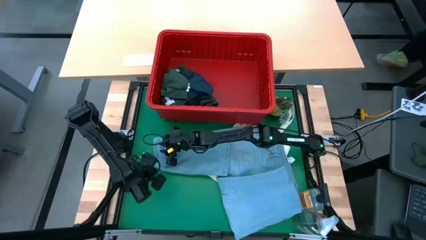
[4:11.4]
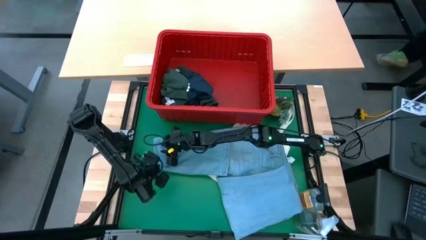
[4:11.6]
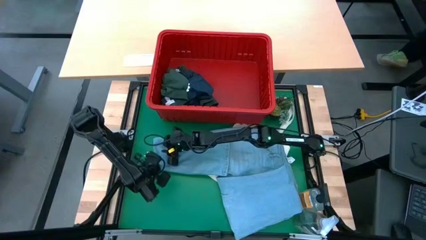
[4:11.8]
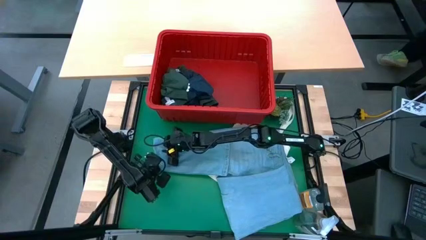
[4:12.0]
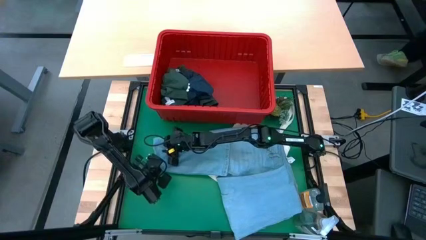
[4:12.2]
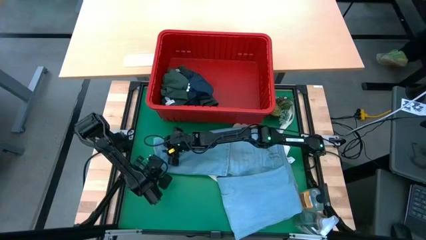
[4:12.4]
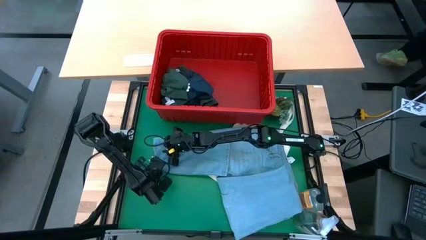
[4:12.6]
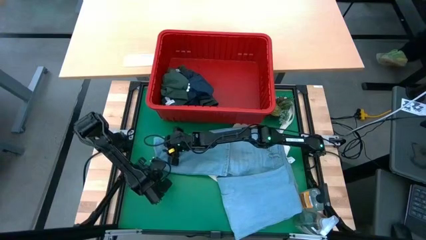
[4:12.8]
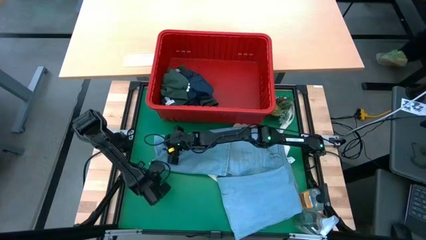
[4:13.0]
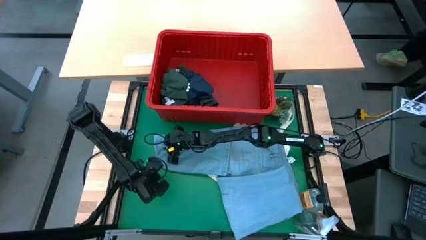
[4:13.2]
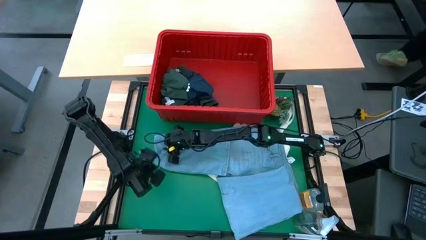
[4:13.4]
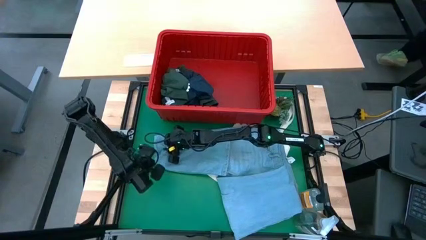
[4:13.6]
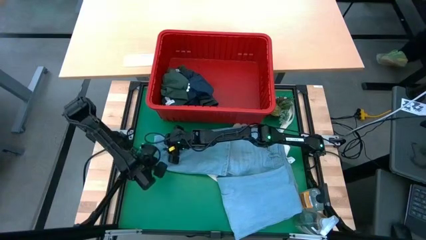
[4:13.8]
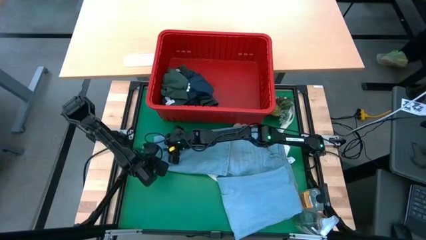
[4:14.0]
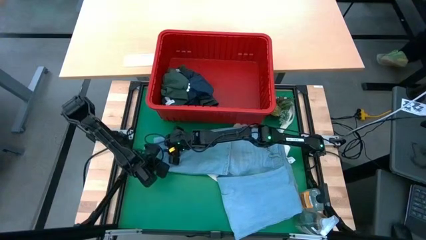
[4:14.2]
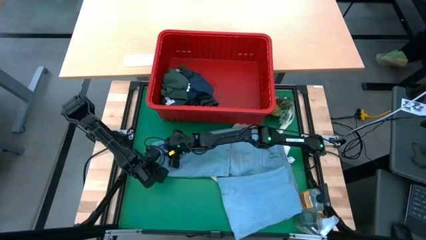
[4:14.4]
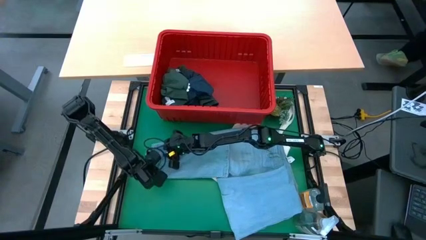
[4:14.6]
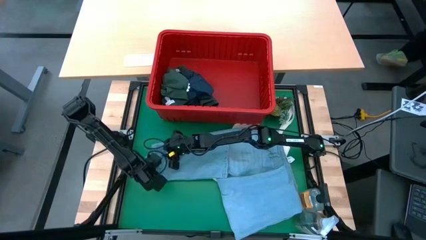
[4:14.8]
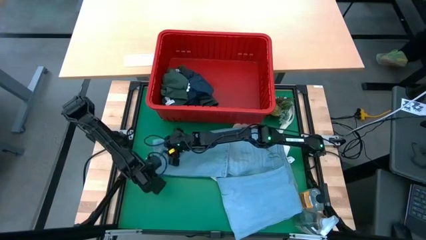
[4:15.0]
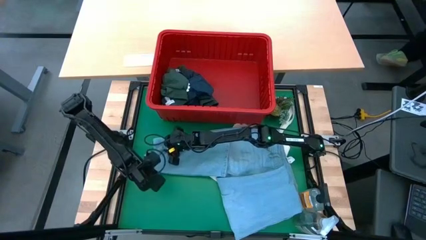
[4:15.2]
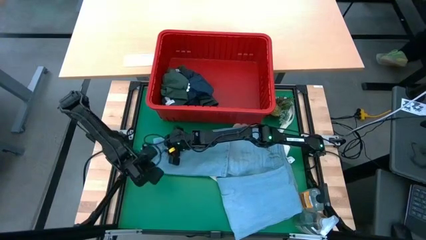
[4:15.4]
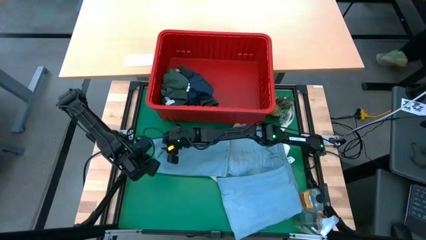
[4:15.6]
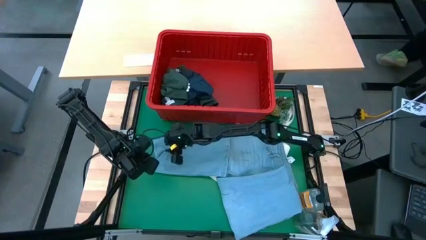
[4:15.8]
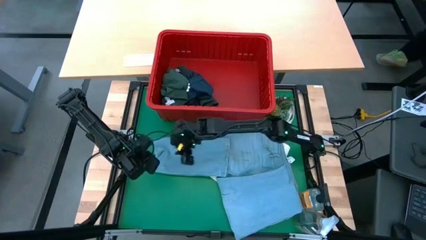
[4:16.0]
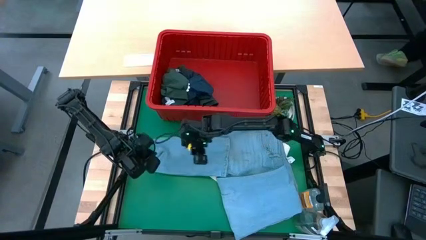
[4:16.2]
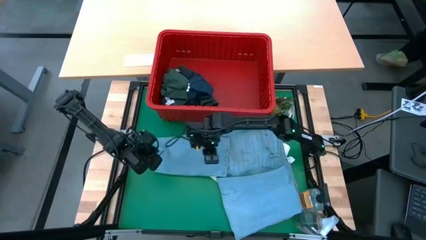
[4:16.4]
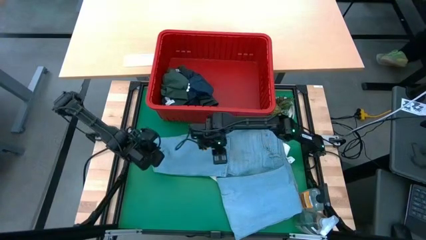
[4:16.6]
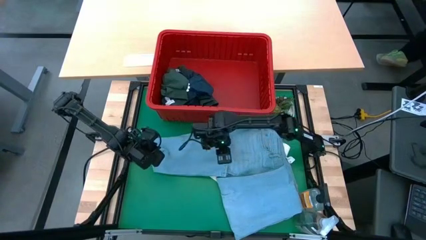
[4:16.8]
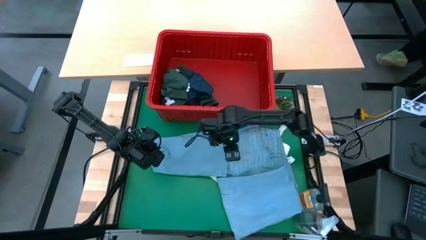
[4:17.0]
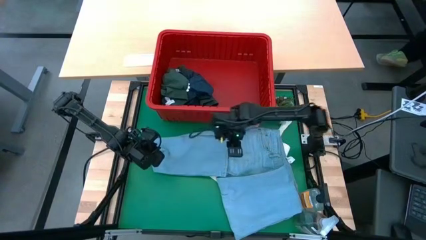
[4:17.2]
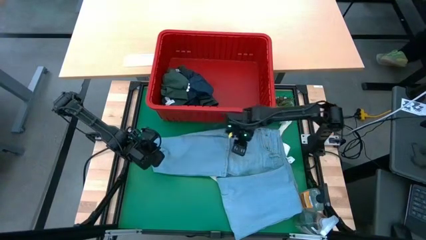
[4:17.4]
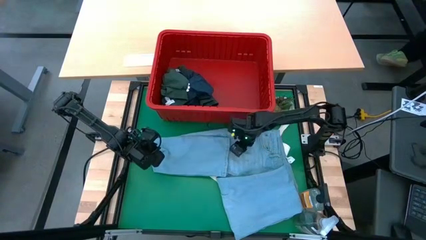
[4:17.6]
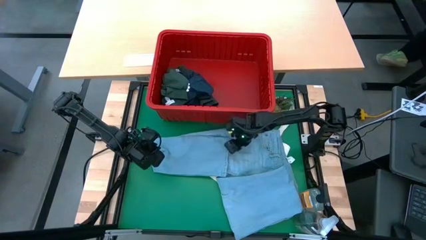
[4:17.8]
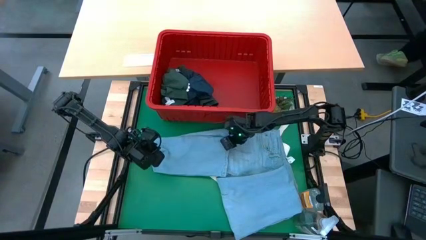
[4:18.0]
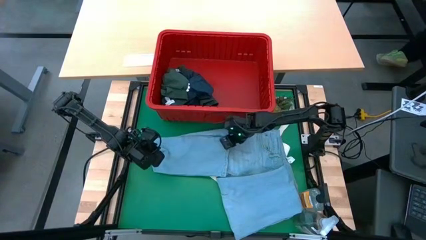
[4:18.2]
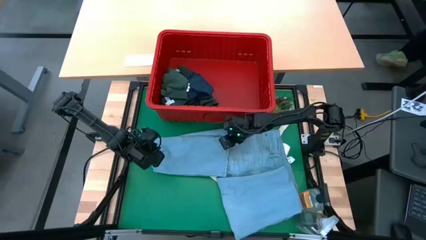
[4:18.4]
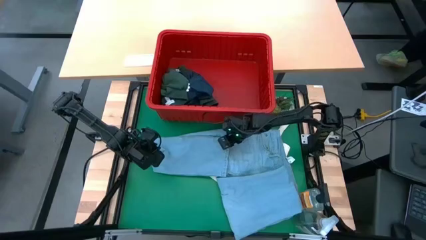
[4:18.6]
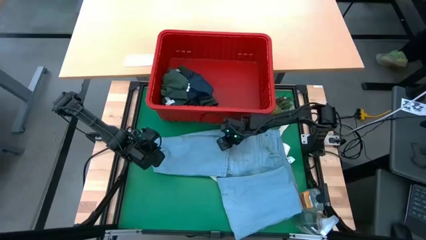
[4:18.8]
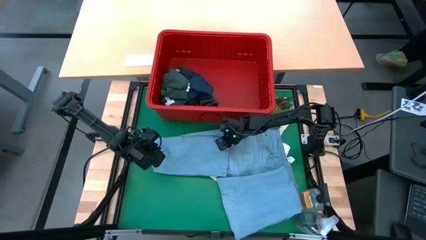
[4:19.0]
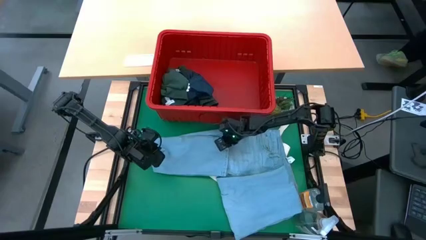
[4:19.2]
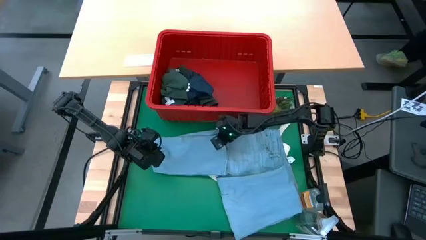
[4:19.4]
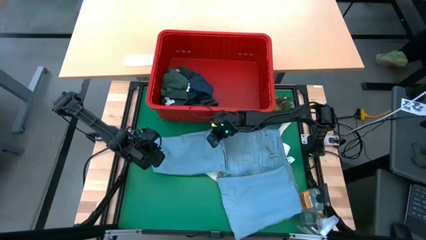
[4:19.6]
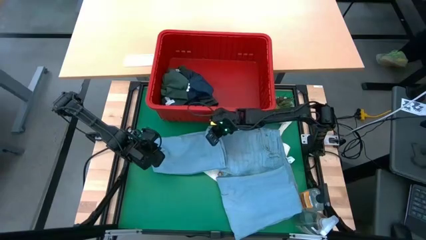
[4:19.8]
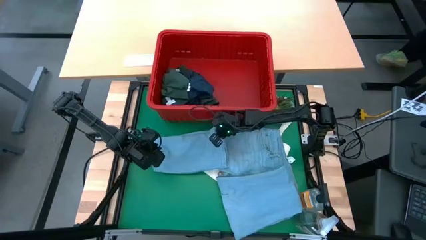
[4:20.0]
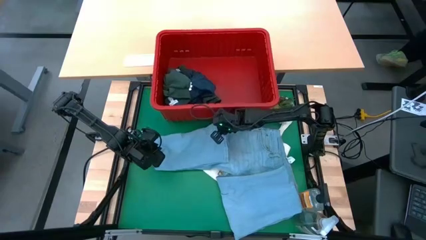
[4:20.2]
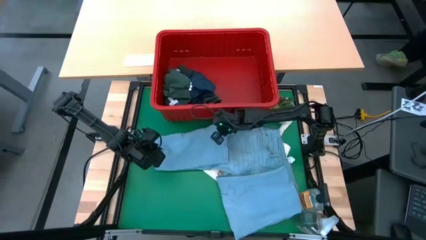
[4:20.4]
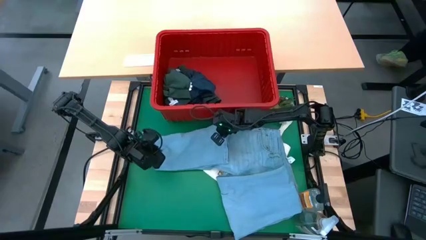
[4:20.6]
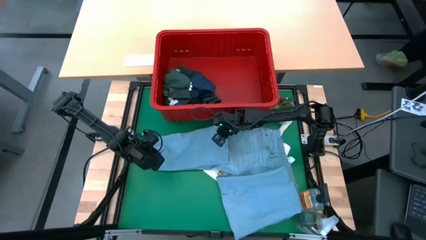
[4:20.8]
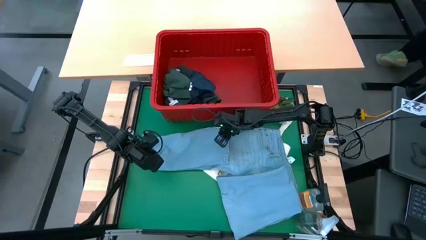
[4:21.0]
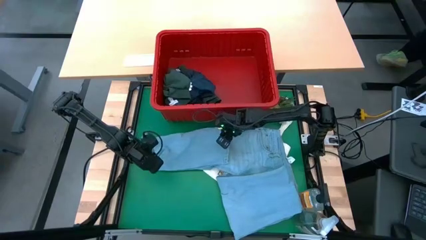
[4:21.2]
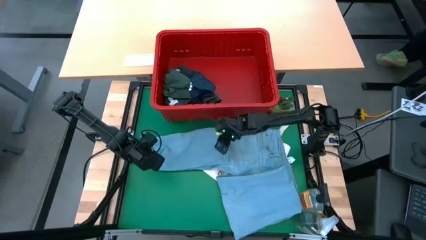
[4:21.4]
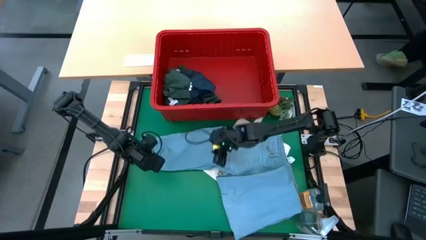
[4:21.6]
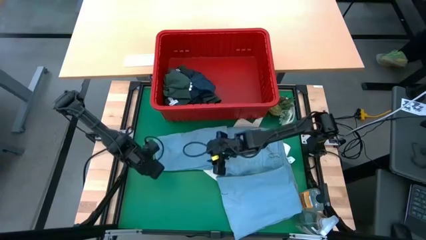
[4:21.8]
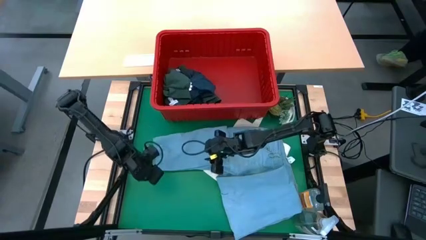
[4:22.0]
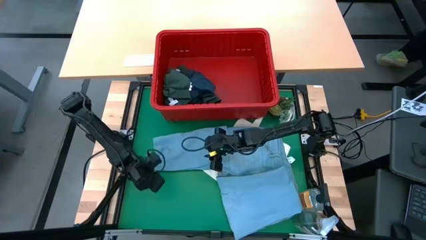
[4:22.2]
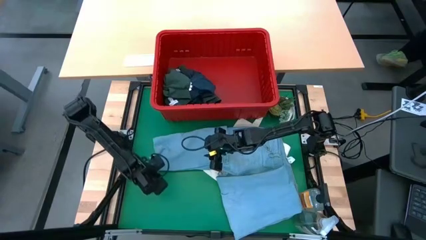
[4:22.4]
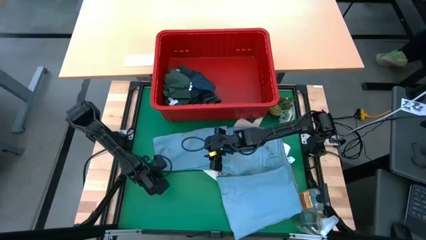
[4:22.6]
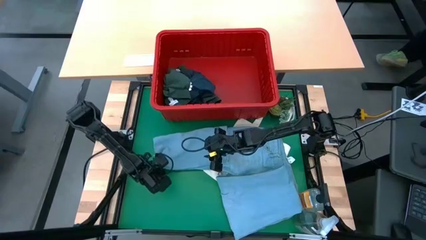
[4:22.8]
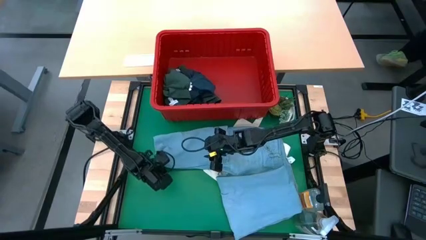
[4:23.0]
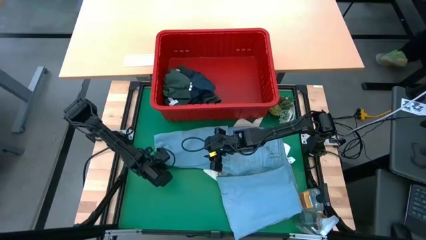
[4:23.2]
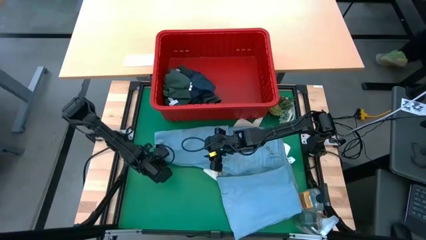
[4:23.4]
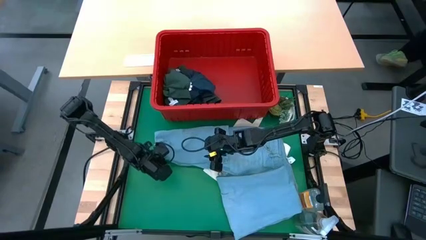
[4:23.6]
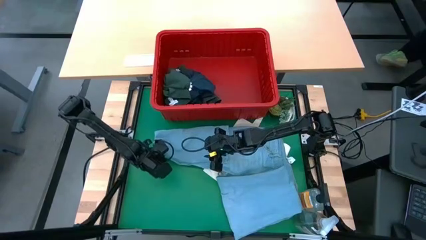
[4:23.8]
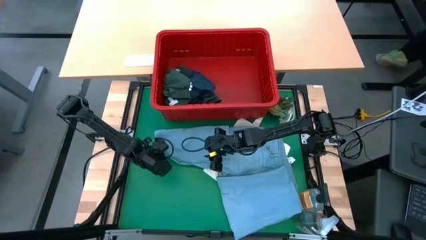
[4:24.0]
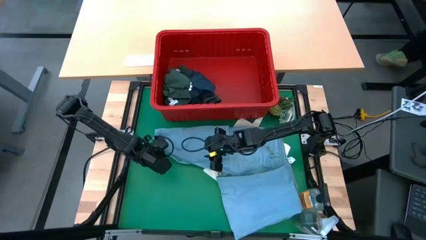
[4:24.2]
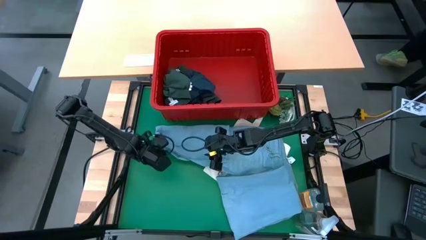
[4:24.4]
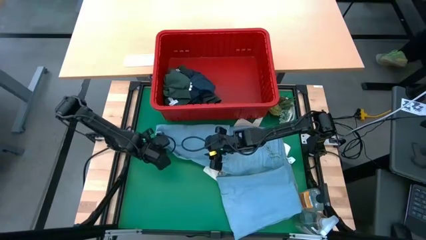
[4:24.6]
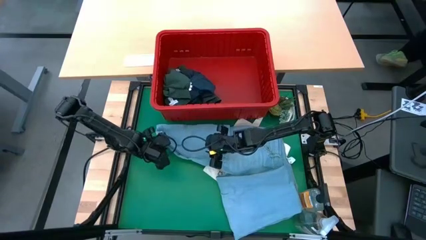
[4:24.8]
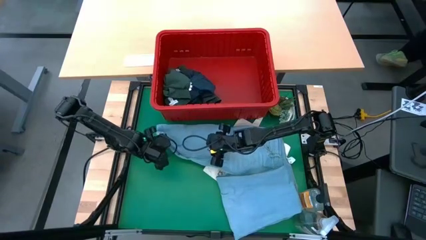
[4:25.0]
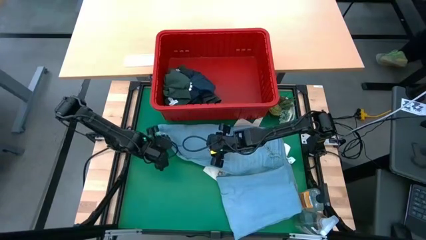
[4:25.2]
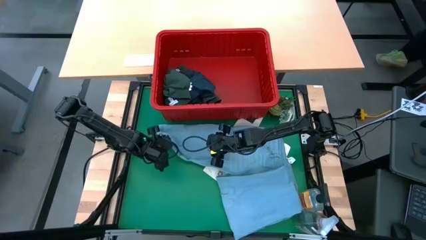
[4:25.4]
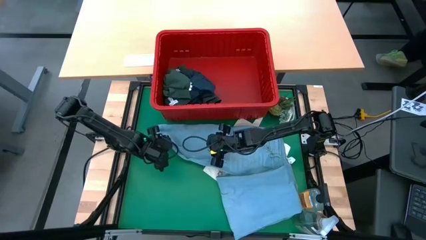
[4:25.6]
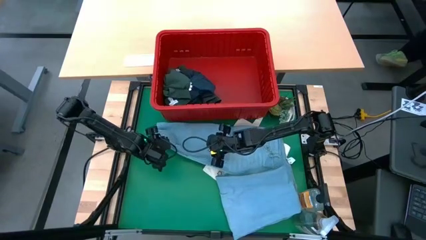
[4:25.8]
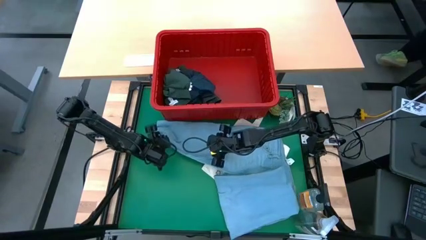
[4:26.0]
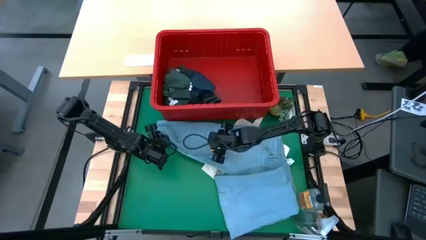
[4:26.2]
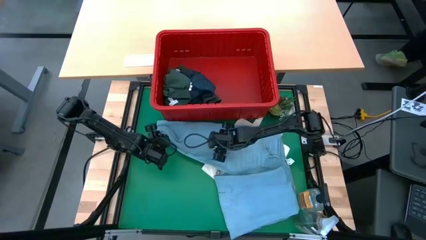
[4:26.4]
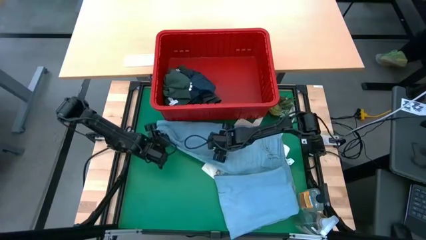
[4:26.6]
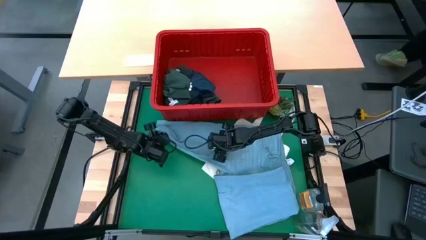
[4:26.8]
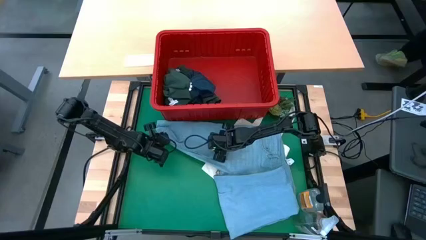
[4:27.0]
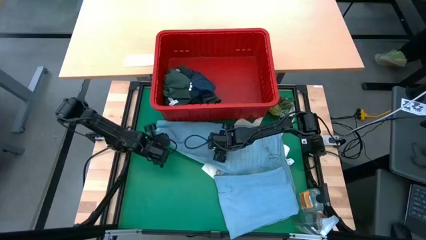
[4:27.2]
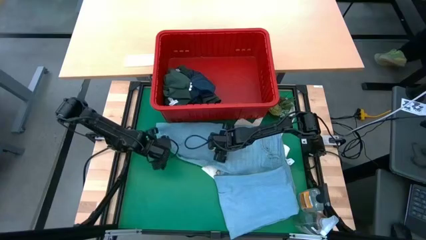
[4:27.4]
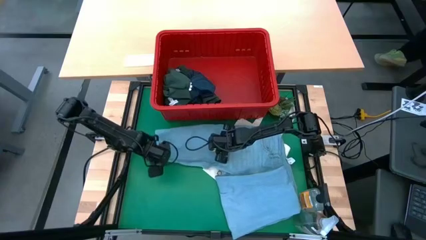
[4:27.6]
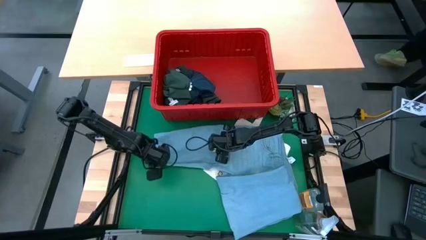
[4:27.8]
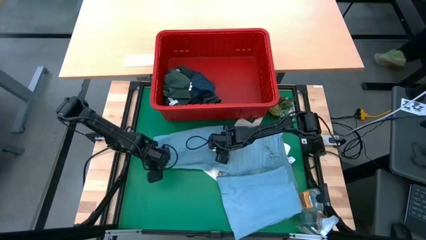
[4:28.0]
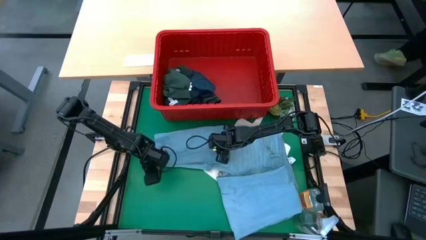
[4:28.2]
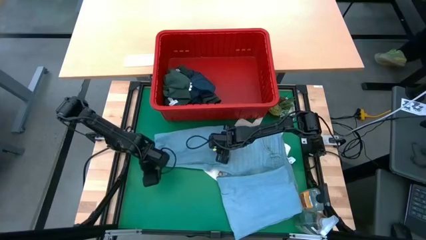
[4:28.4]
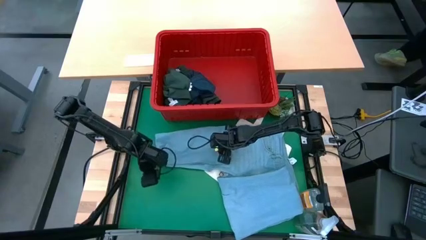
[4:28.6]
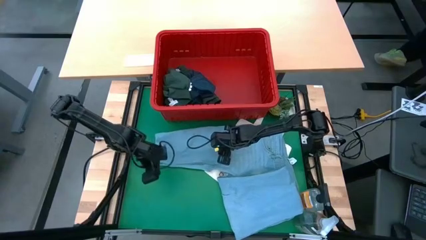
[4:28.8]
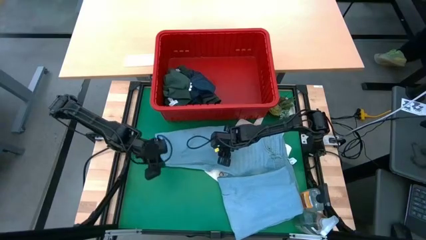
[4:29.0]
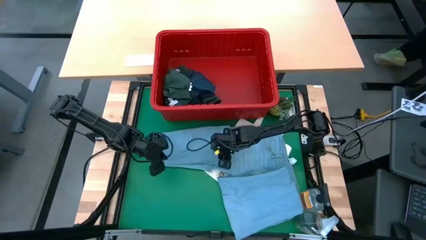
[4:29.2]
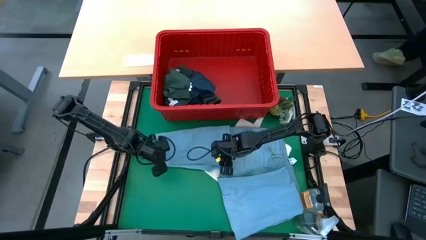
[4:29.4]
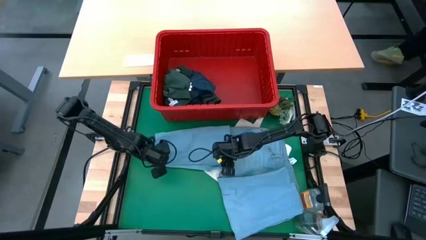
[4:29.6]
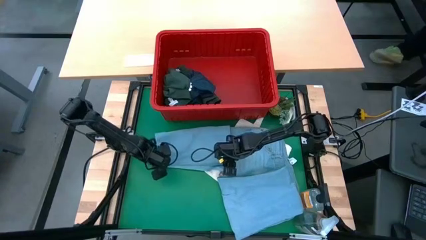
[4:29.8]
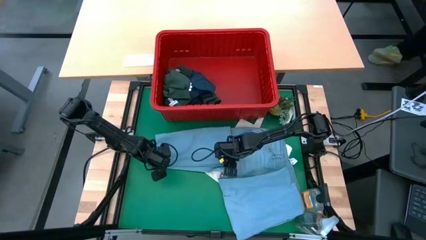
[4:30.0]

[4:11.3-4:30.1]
Task: Fold Laundry from Bin
Fold the light blue jeans
